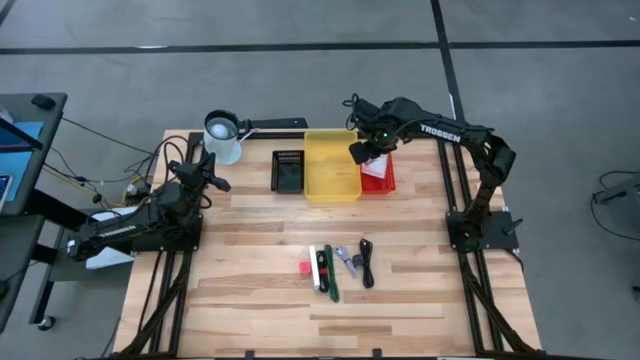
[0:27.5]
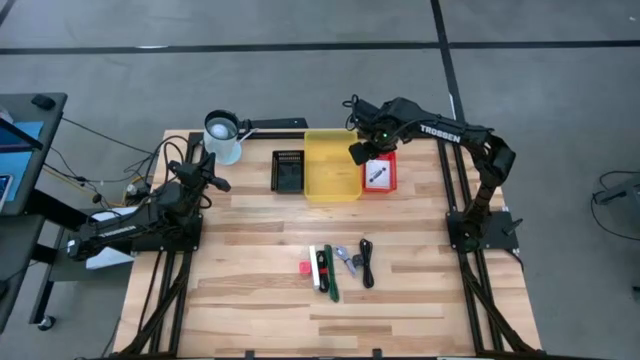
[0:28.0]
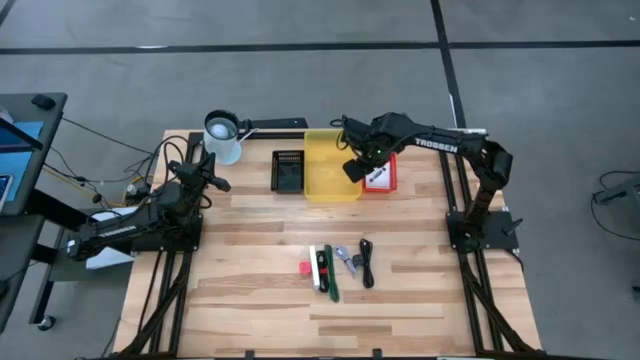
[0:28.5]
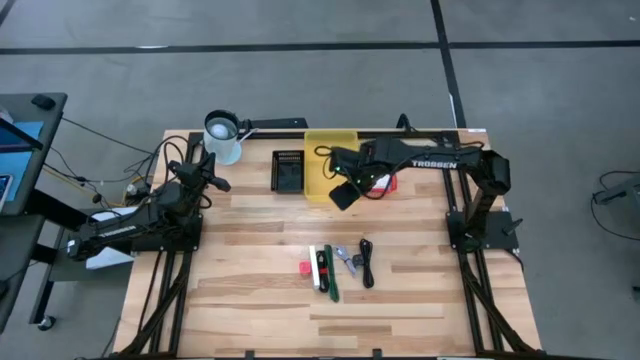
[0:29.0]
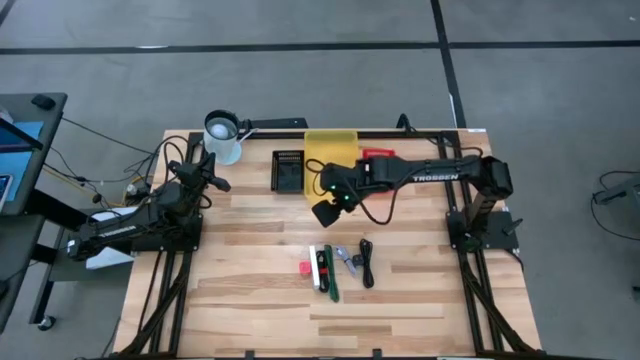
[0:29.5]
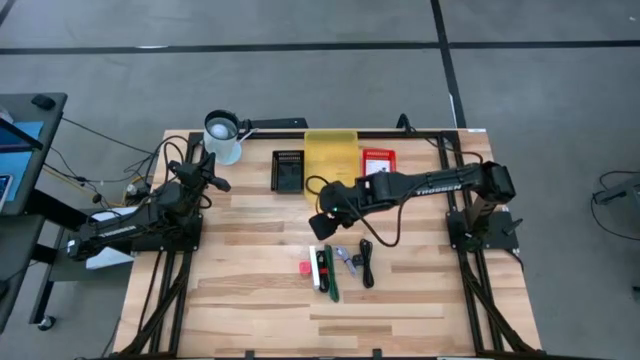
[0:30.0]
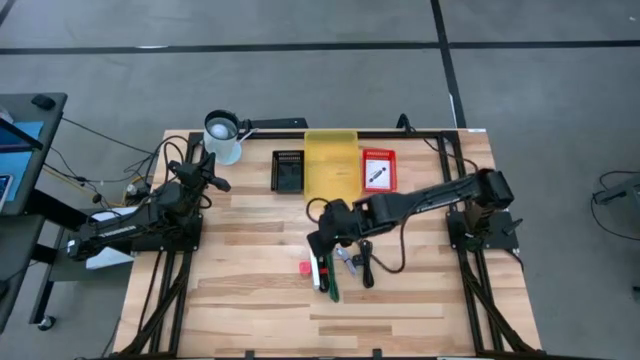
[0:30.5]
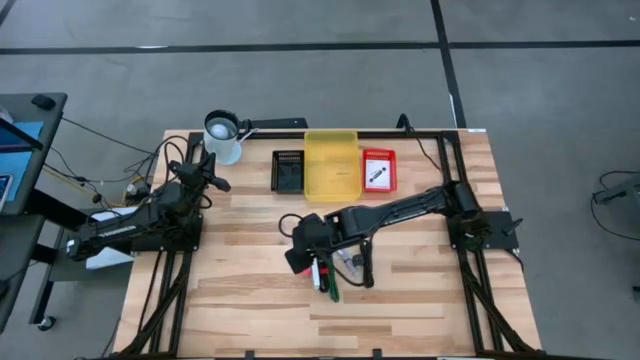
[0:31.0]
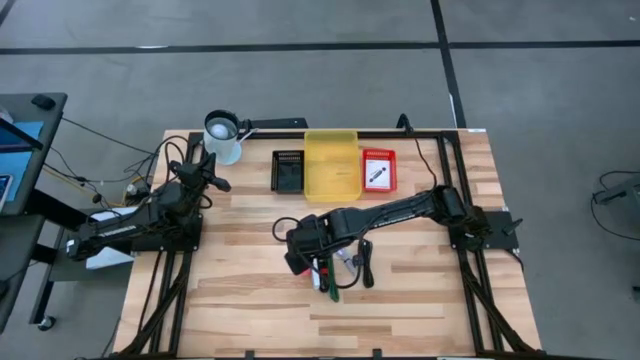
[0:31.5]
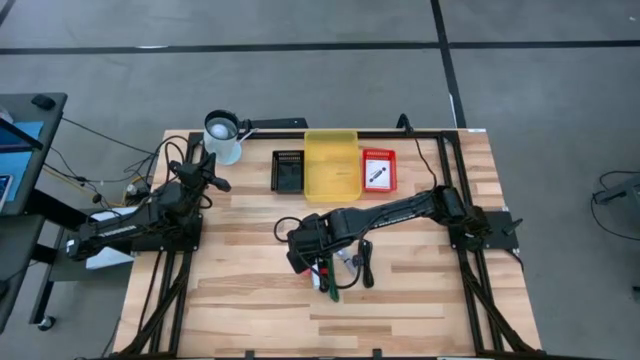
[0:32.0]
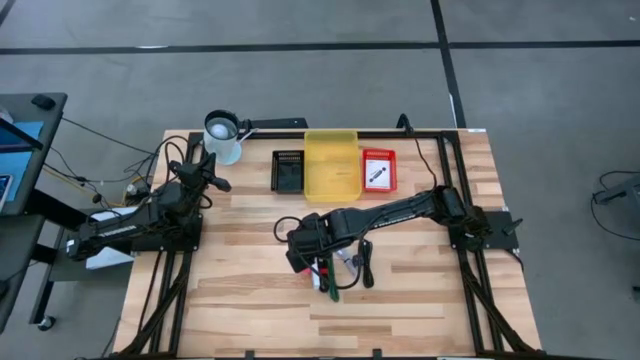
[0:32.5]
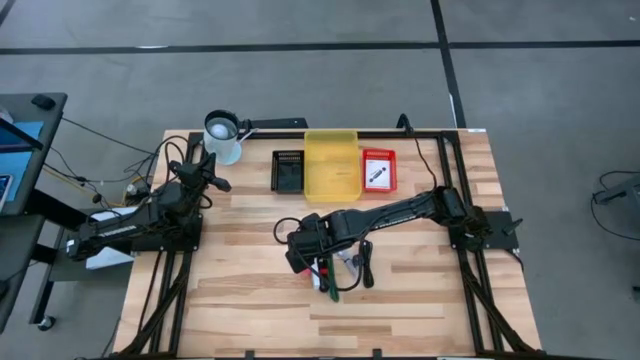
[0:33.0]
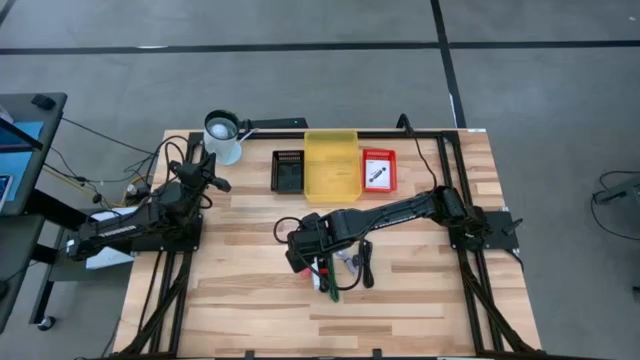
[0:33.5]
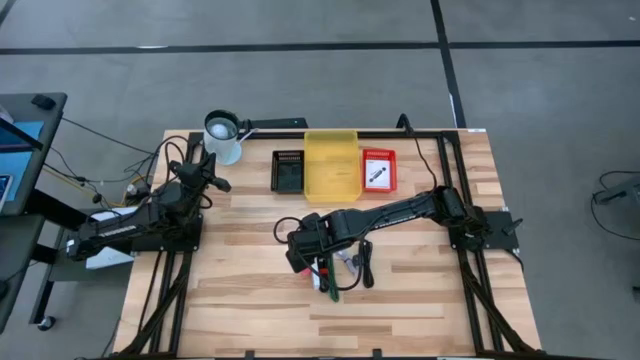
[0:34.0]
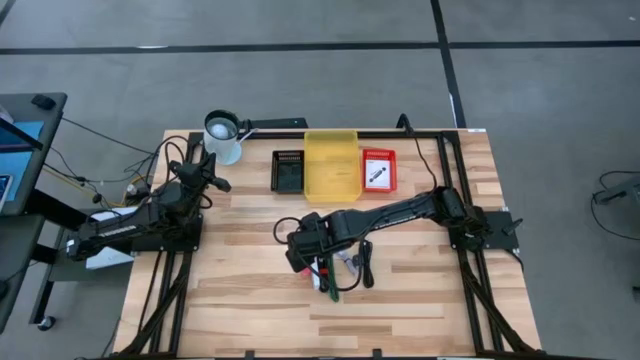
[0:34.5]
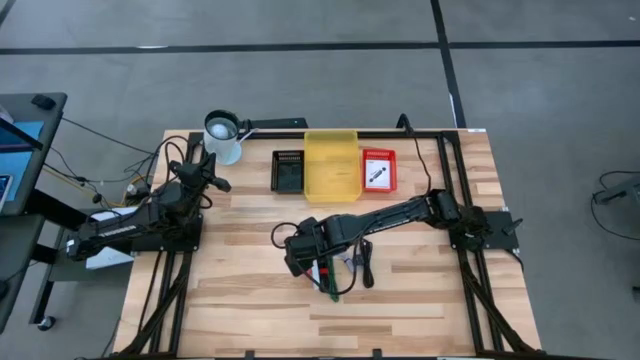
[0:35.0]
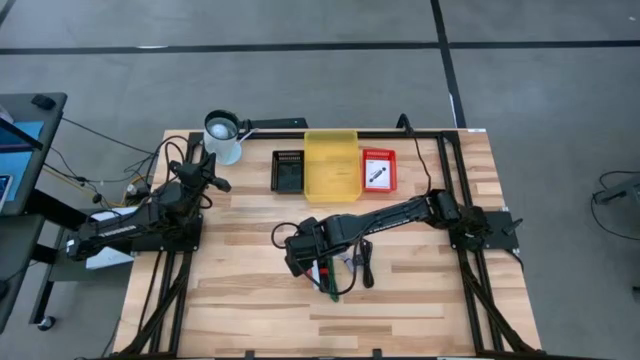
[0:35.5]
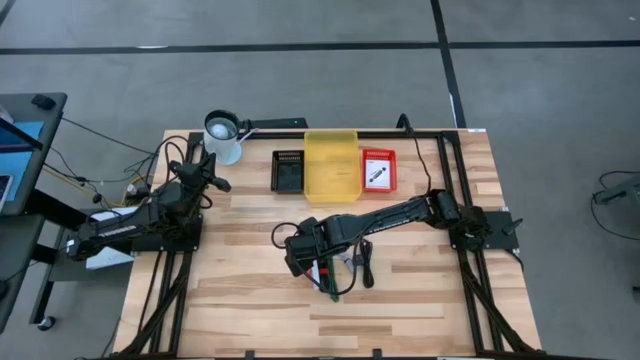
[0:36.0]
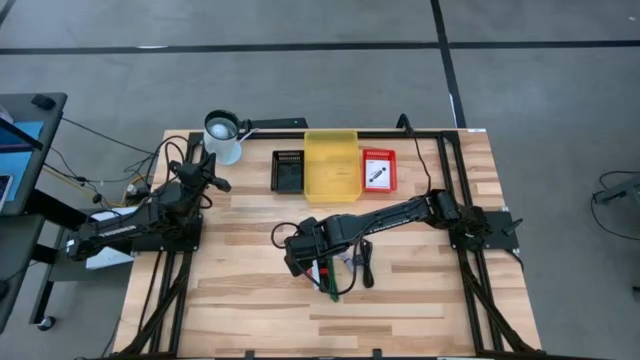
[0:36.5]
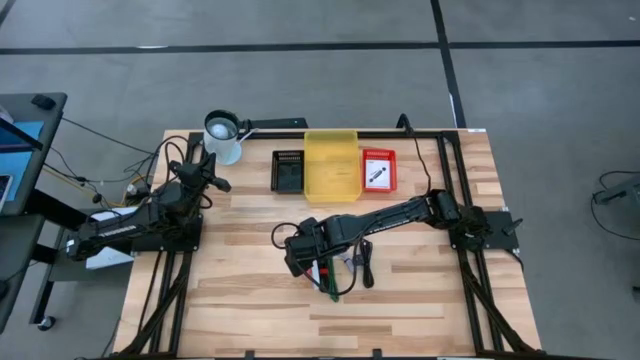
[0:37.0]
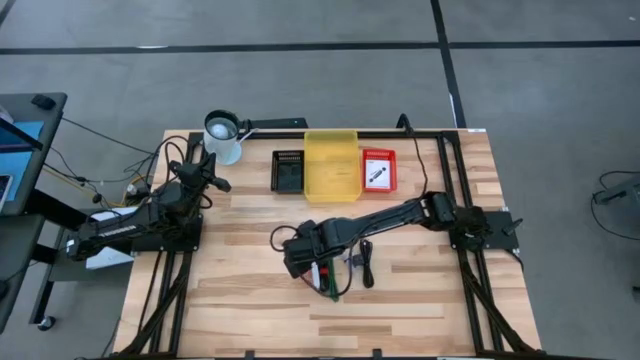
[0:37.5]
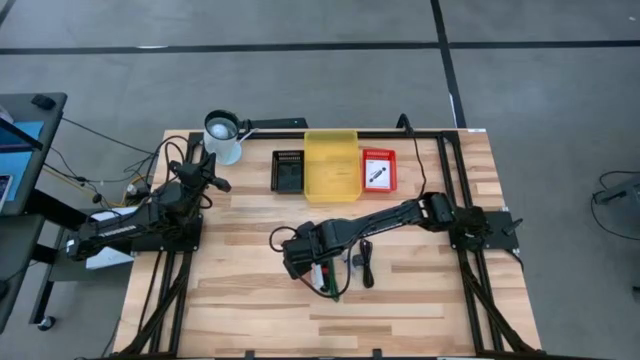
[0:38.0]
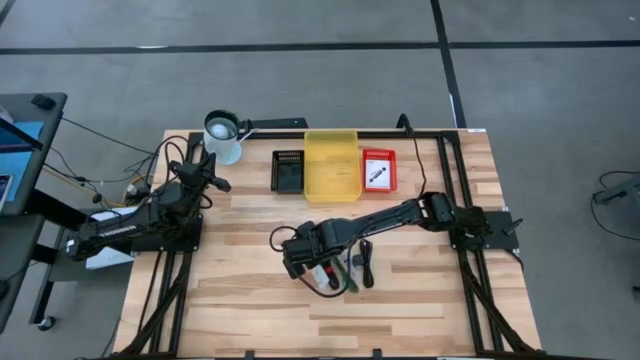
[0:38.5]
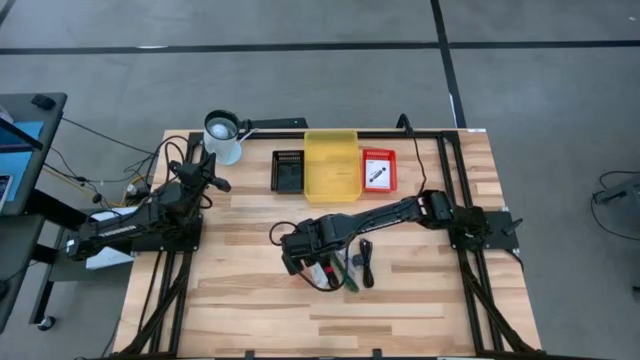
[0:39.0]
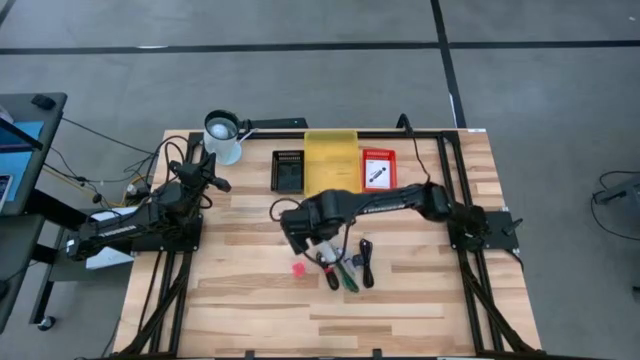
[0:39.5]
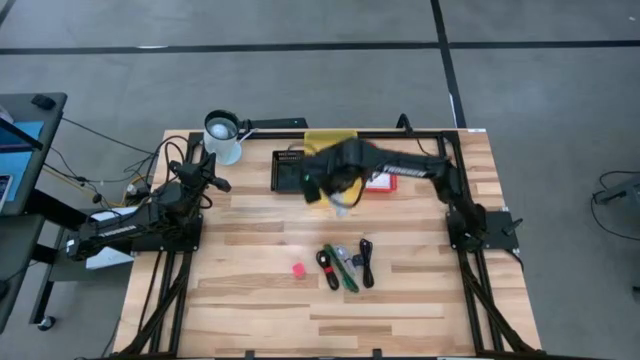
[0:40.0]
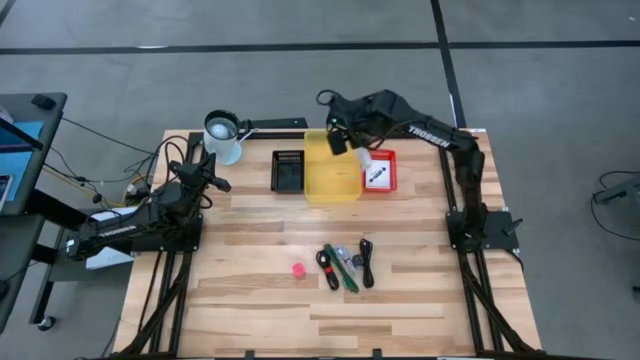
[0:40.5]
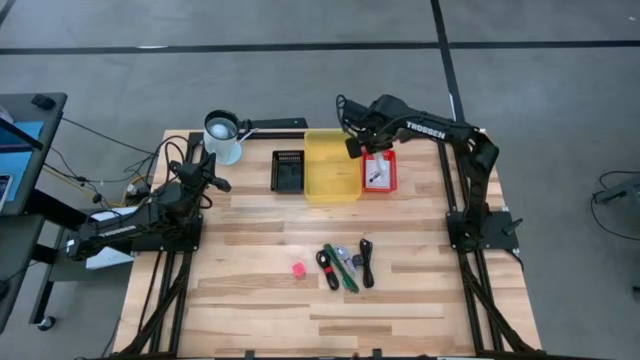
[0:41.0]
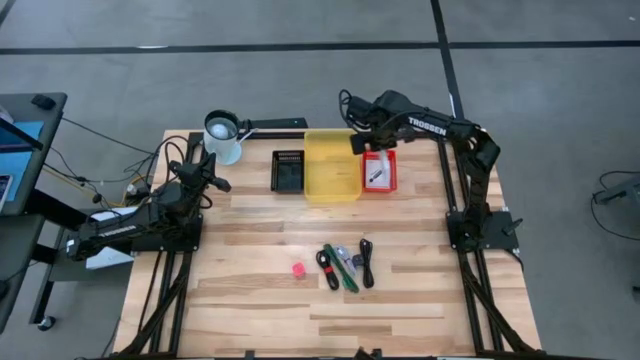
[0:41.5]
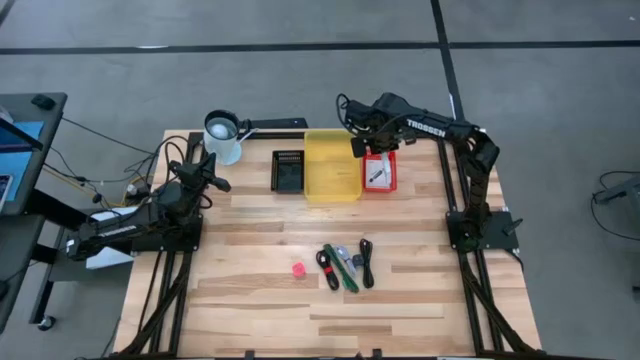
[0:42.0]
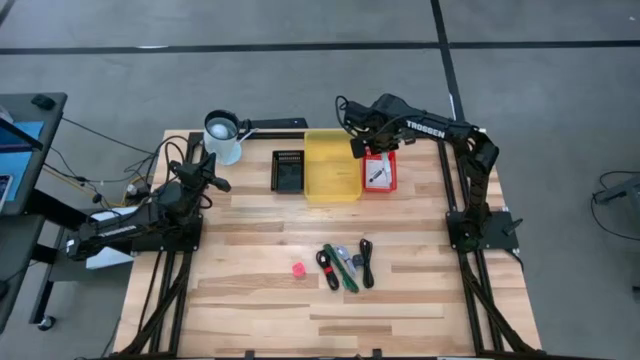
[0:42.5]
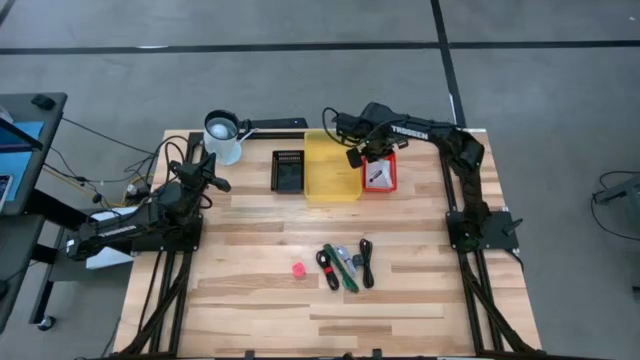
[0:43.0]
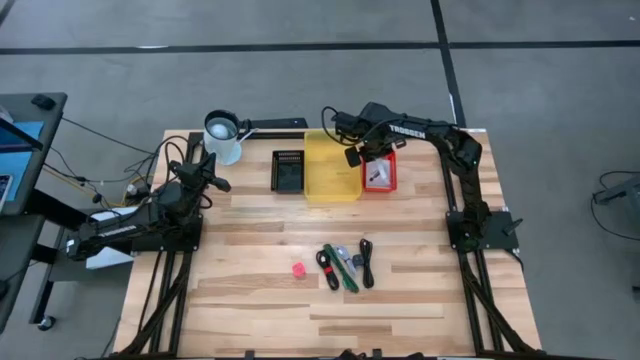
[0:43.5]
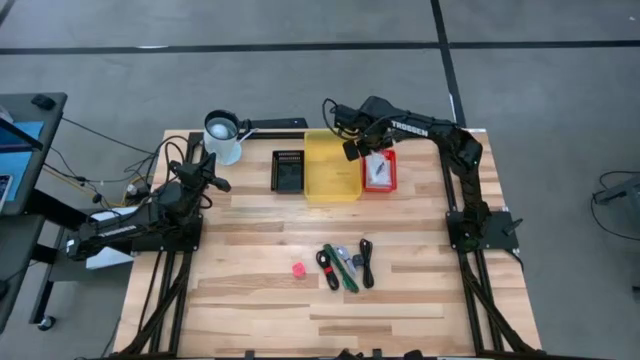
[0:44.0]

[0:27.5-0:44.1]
Task: Pick and place items into bin
Put the white card reader box into the red bin

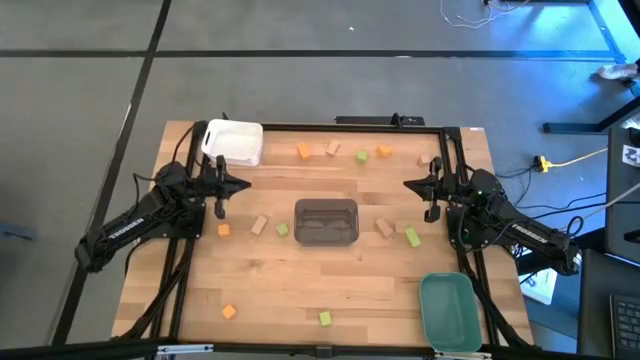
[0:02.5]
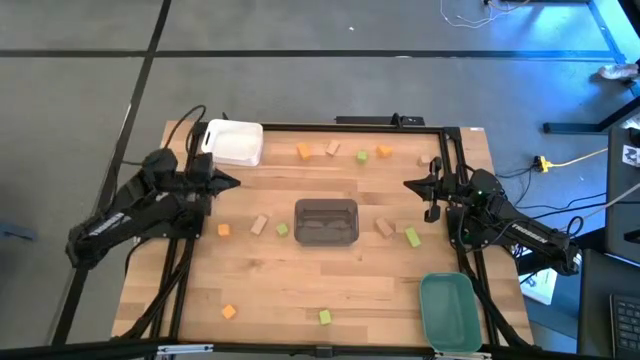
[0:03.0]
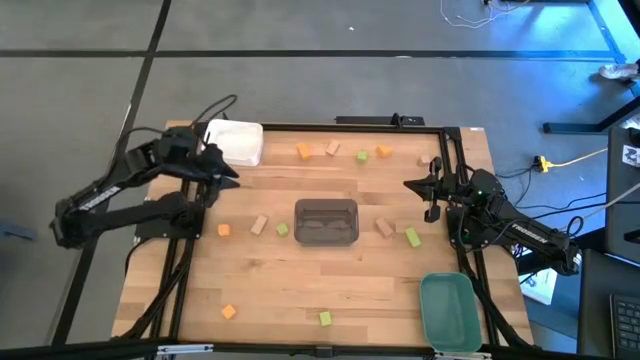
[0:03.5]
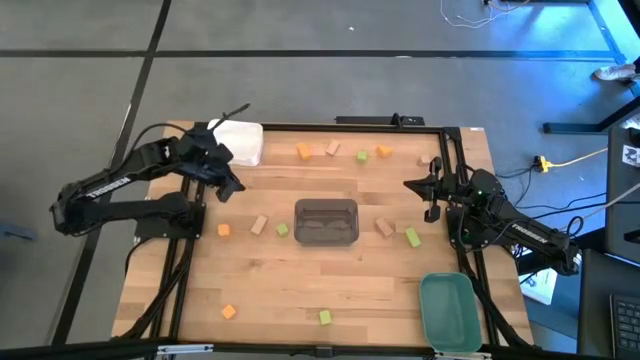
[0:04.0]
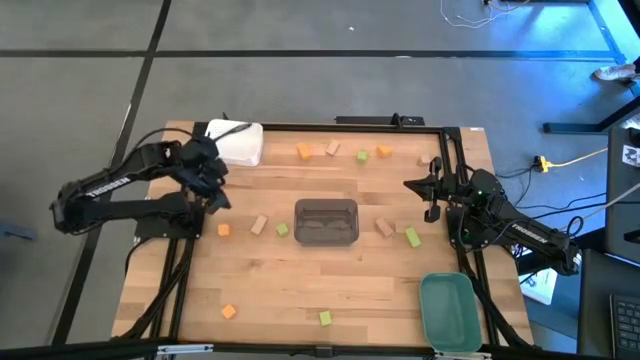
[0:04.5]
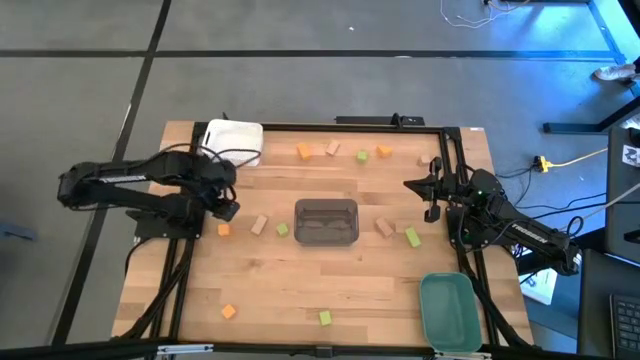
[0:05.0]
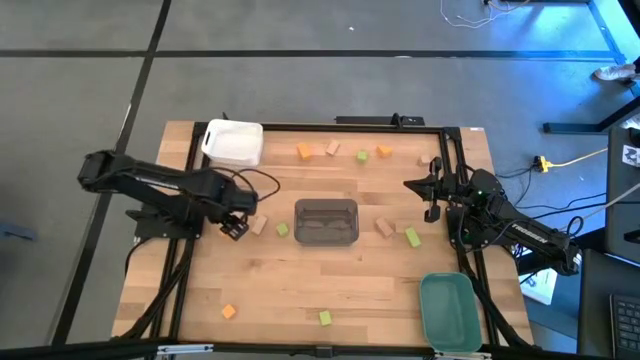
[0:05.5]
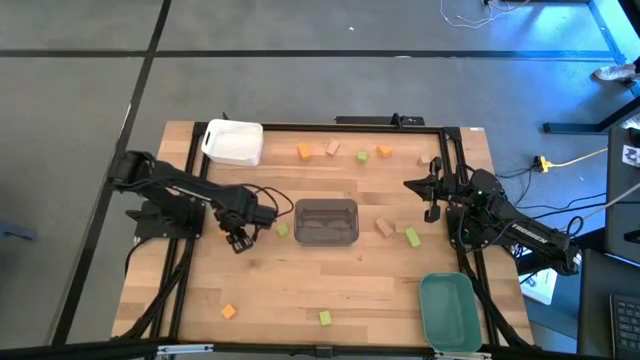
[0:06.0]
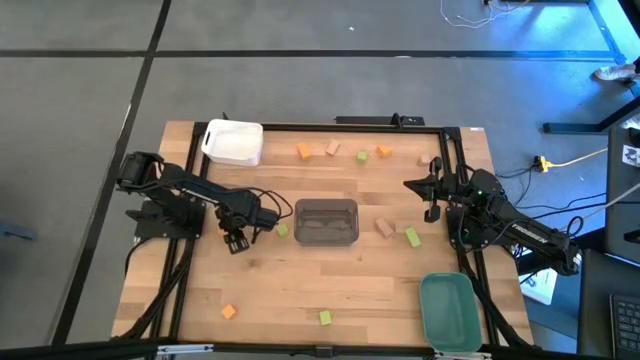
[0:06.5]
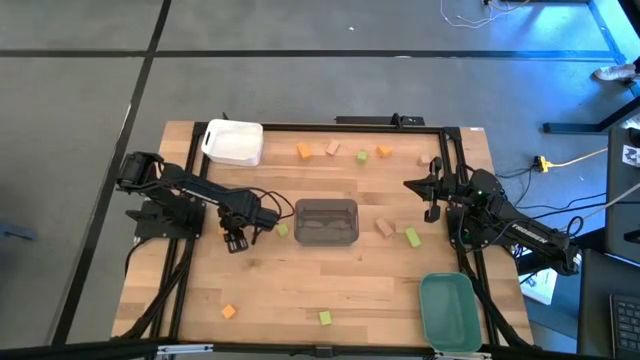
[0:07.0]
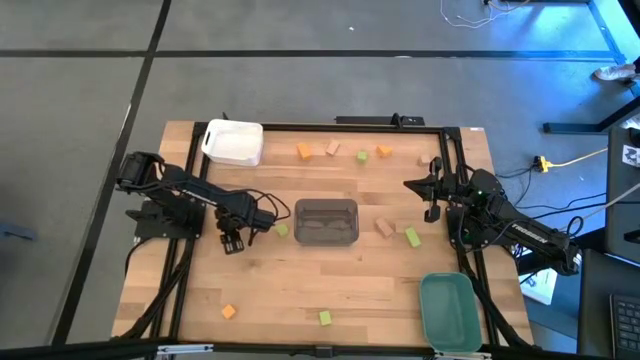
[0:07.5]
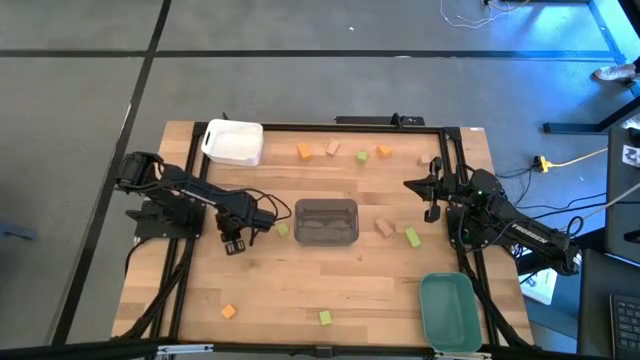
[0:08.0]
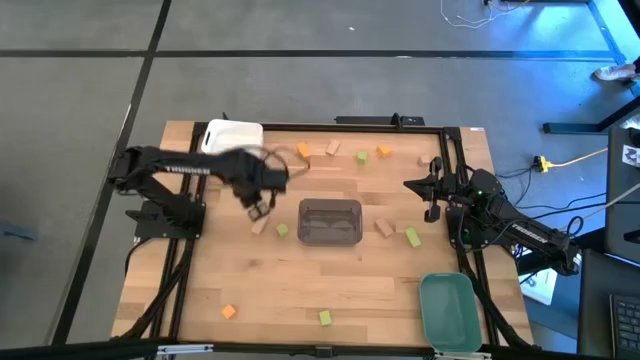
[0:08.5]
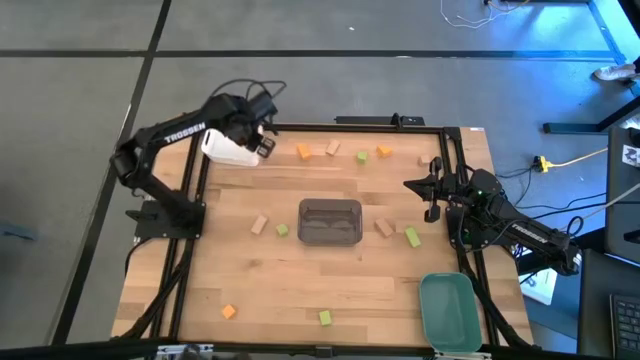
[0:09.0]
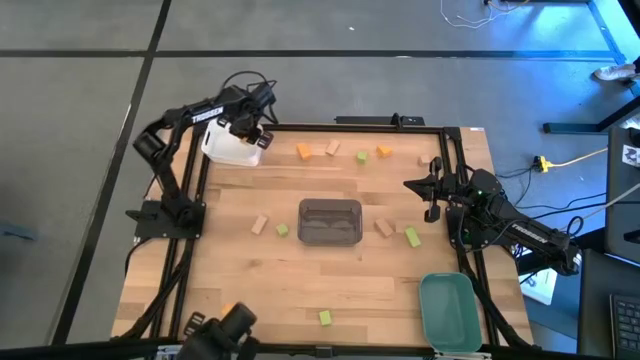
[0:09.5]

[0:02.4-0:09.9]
Task: Sort & place blocks by color
Put the yellow block into the white bin
